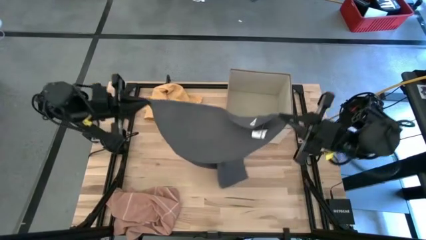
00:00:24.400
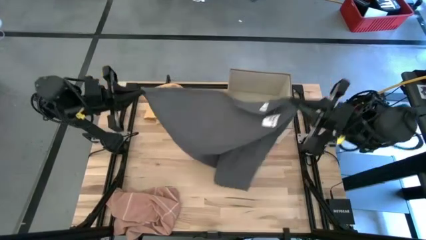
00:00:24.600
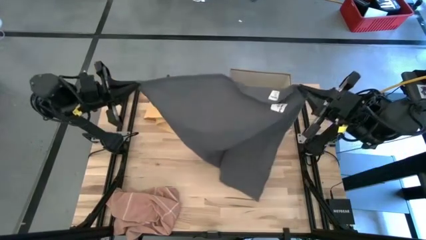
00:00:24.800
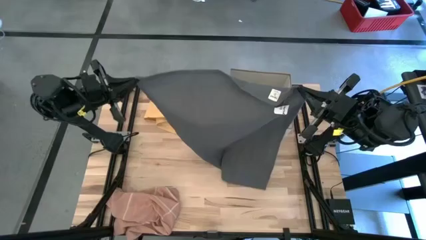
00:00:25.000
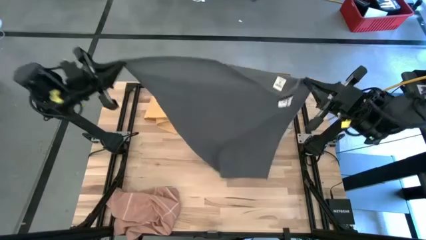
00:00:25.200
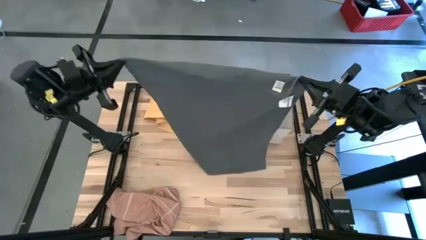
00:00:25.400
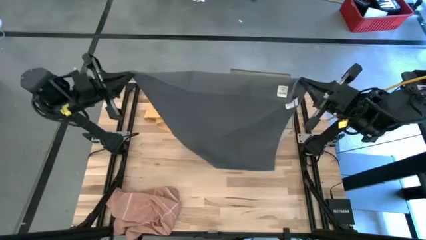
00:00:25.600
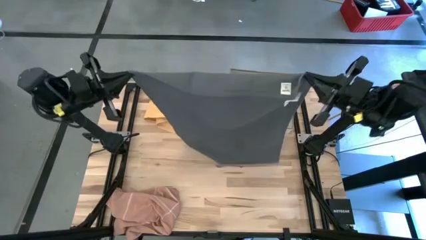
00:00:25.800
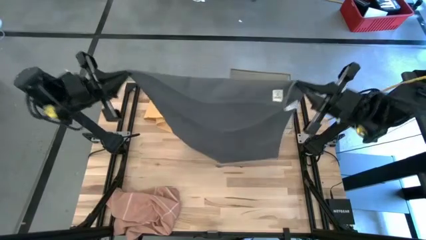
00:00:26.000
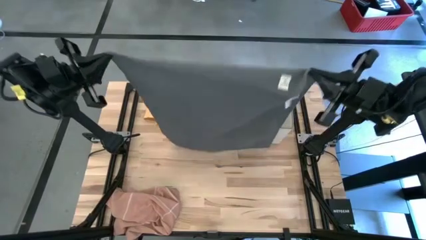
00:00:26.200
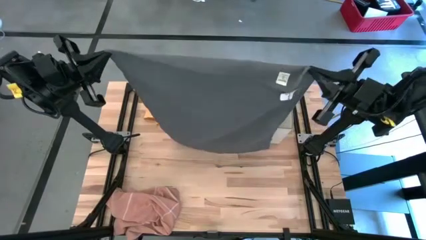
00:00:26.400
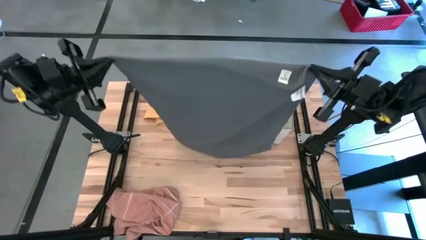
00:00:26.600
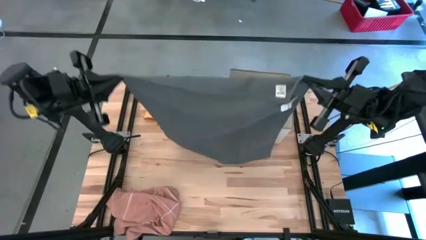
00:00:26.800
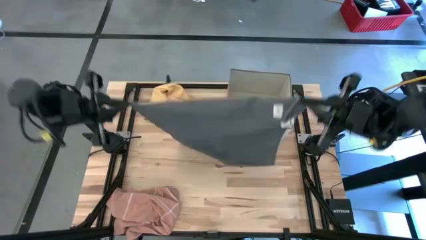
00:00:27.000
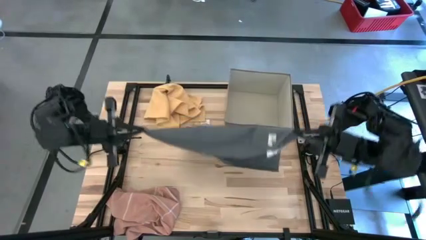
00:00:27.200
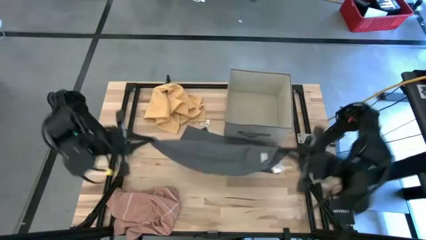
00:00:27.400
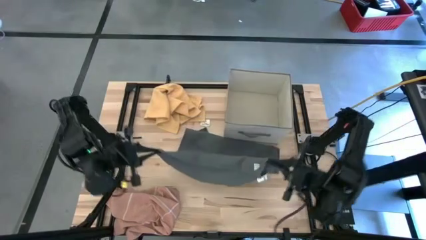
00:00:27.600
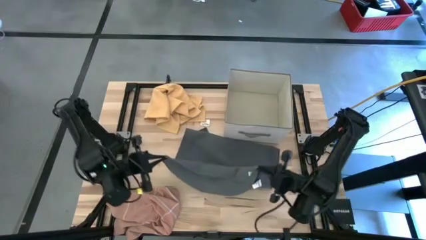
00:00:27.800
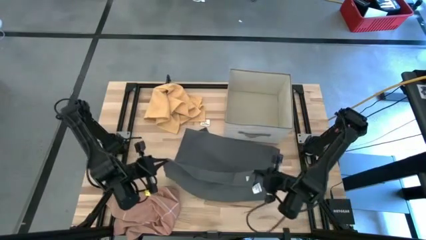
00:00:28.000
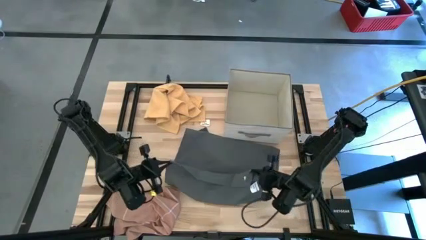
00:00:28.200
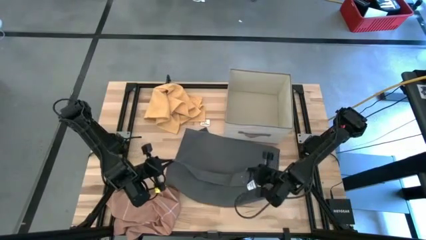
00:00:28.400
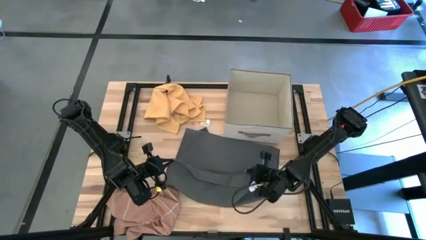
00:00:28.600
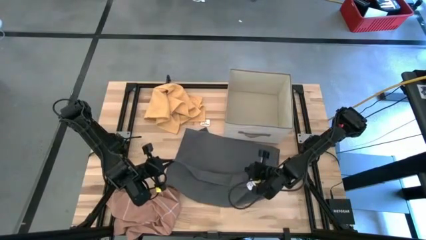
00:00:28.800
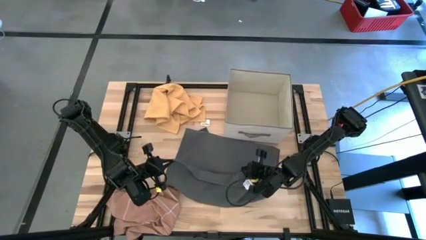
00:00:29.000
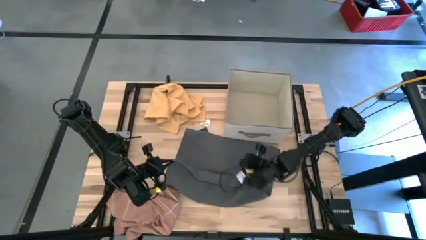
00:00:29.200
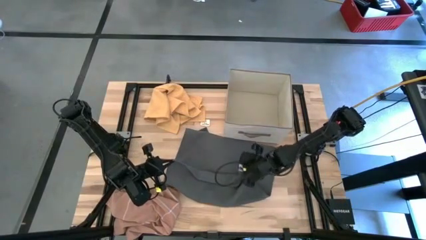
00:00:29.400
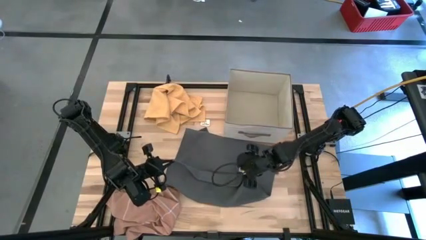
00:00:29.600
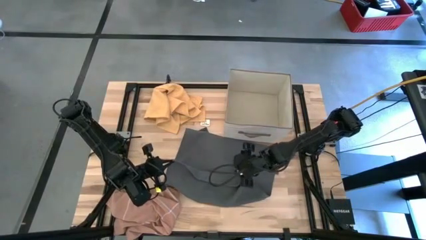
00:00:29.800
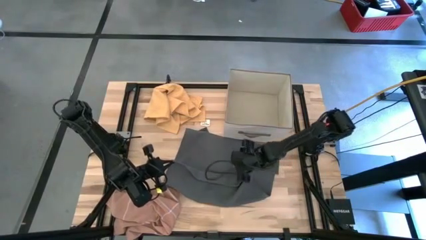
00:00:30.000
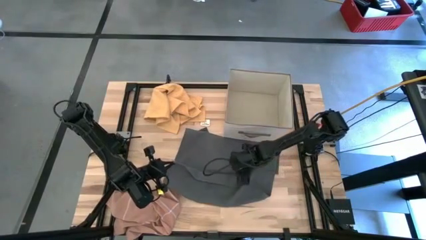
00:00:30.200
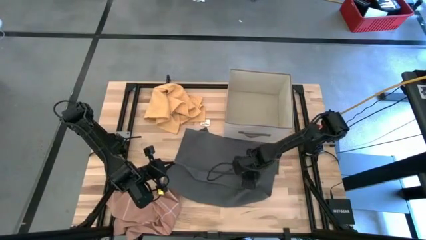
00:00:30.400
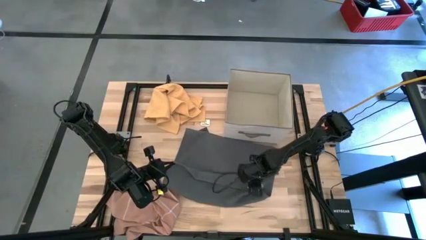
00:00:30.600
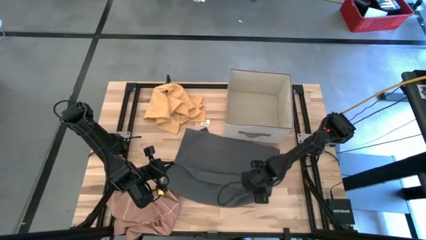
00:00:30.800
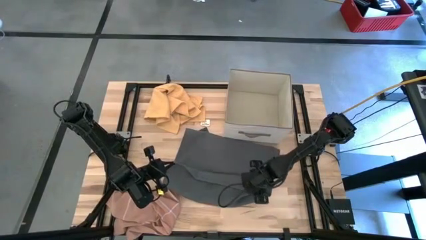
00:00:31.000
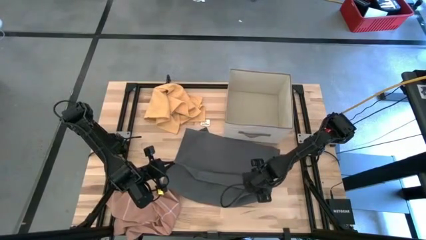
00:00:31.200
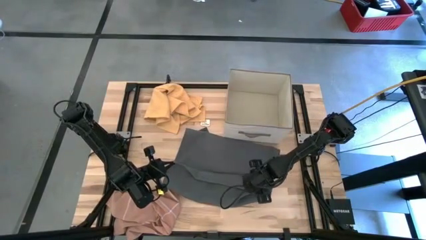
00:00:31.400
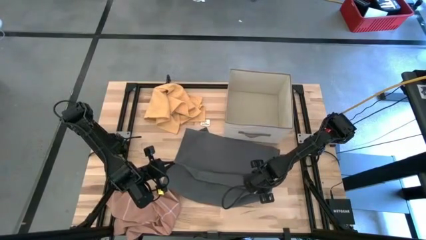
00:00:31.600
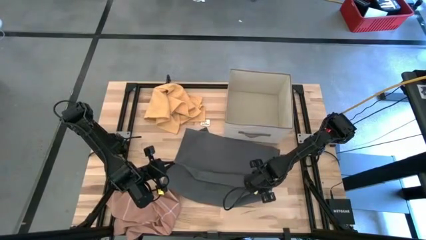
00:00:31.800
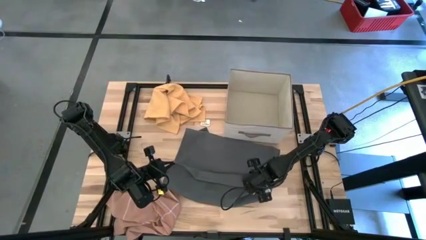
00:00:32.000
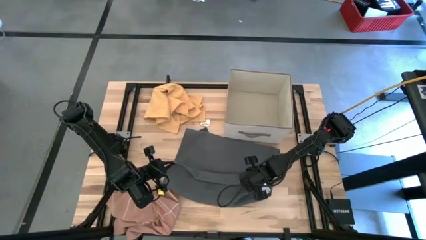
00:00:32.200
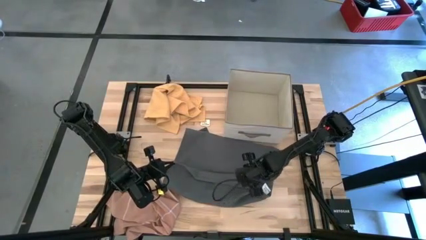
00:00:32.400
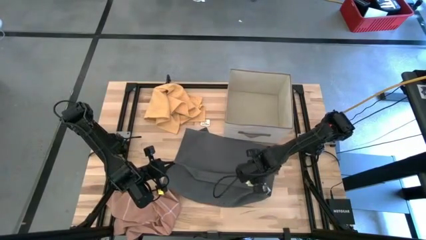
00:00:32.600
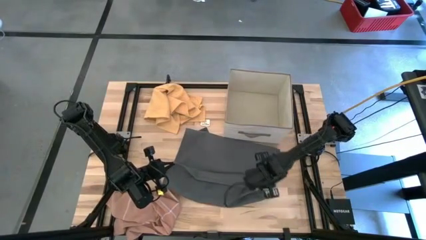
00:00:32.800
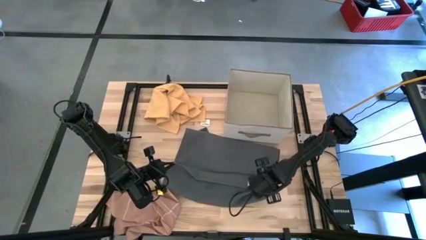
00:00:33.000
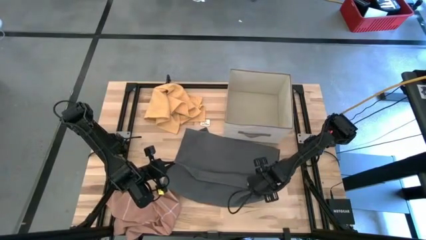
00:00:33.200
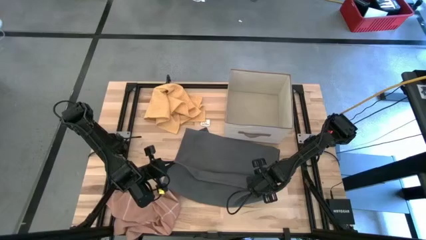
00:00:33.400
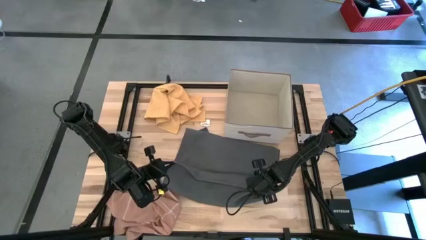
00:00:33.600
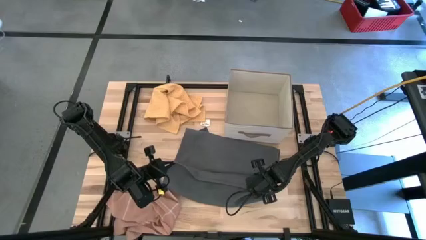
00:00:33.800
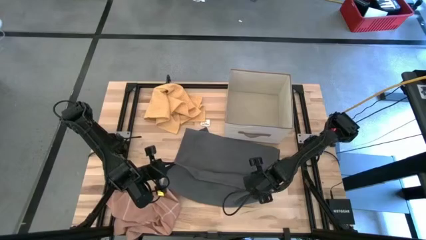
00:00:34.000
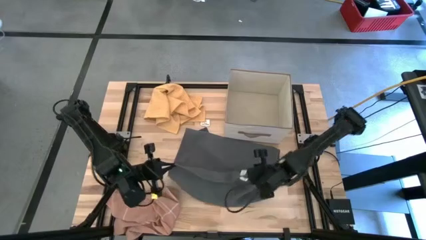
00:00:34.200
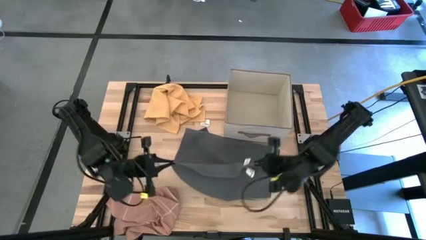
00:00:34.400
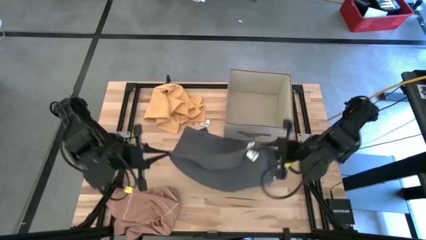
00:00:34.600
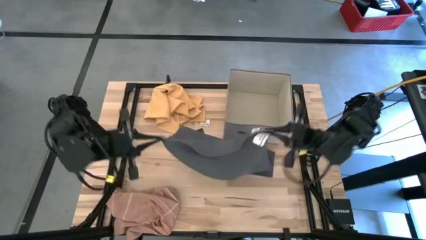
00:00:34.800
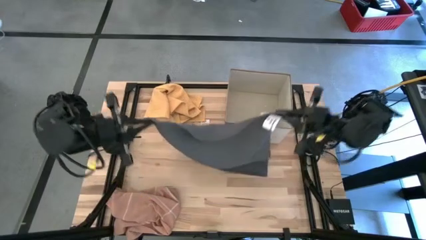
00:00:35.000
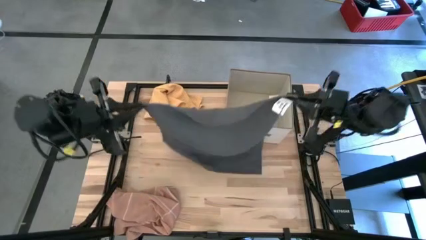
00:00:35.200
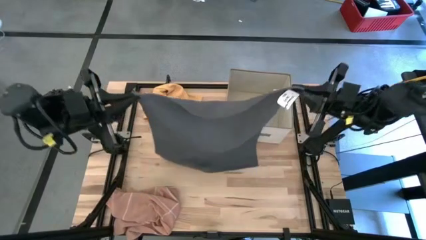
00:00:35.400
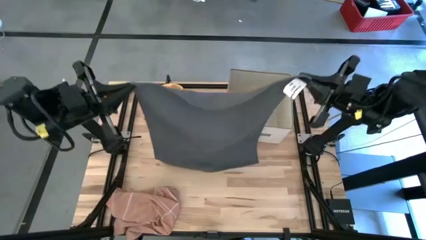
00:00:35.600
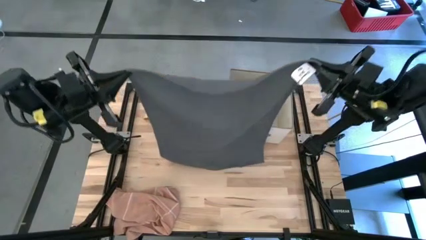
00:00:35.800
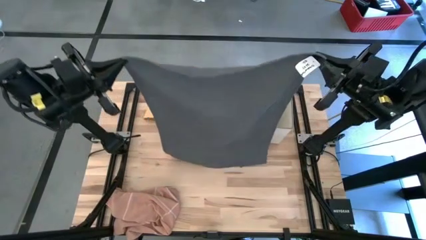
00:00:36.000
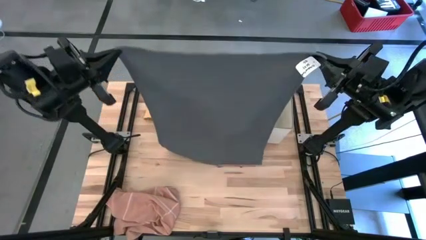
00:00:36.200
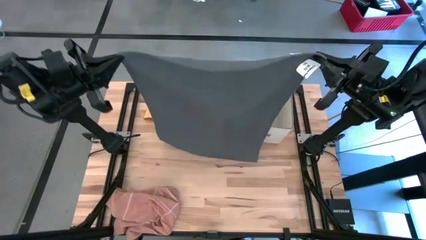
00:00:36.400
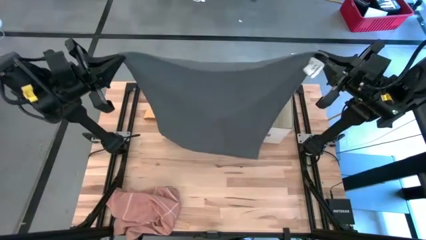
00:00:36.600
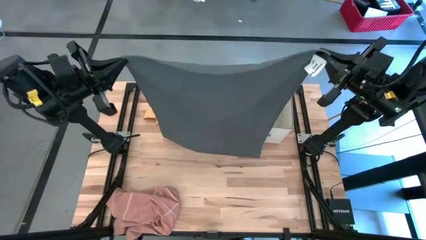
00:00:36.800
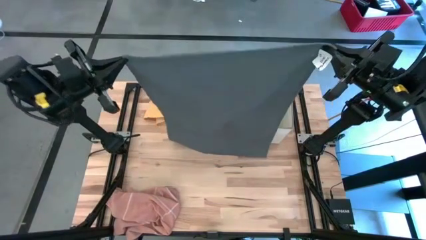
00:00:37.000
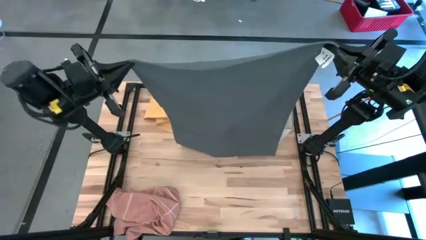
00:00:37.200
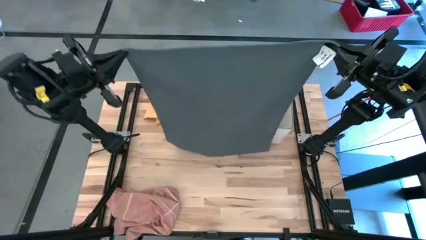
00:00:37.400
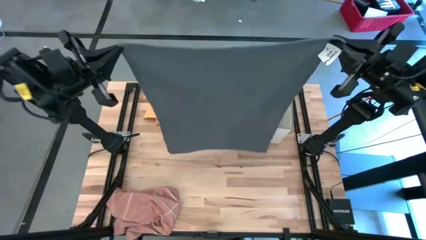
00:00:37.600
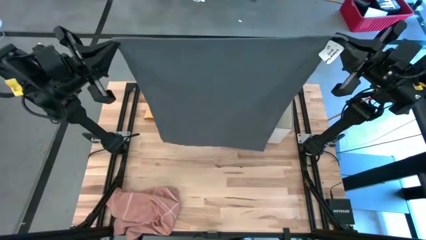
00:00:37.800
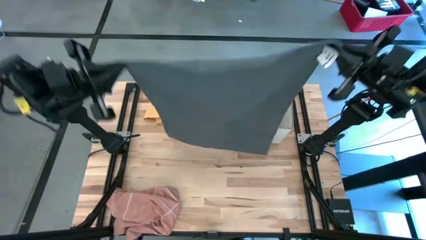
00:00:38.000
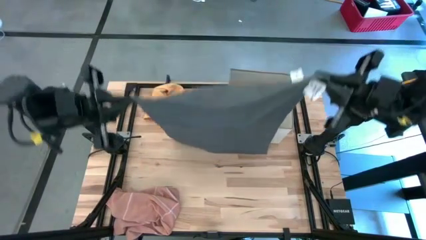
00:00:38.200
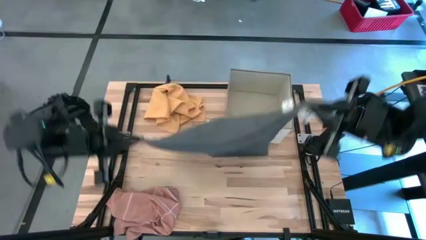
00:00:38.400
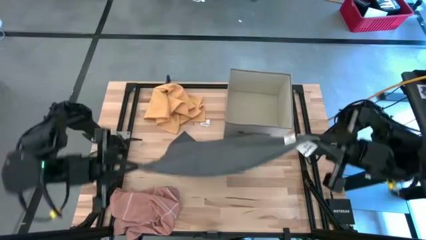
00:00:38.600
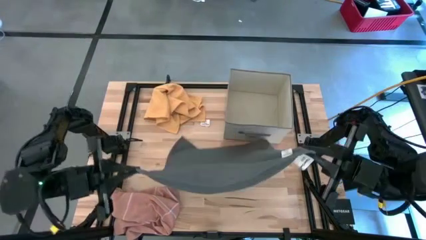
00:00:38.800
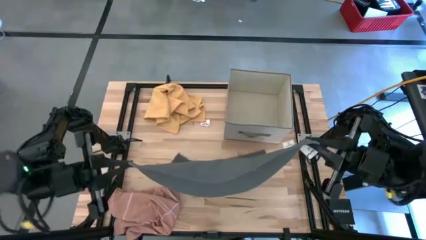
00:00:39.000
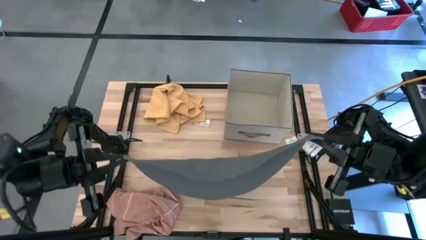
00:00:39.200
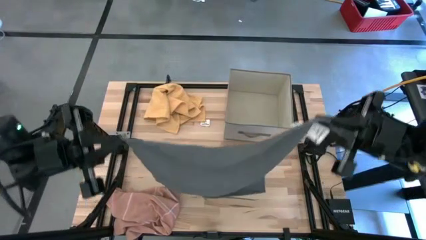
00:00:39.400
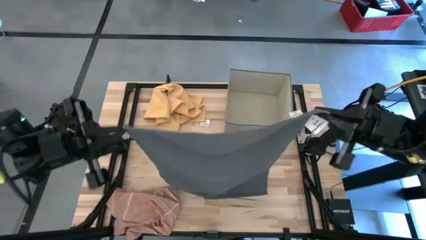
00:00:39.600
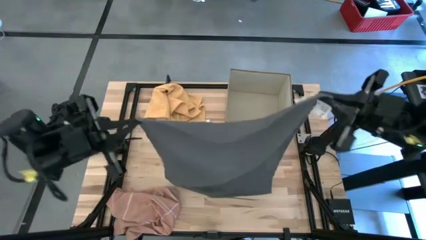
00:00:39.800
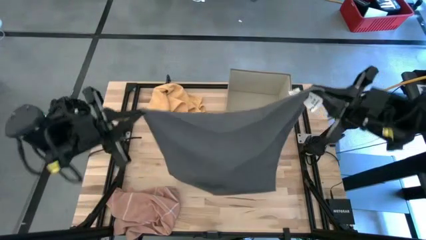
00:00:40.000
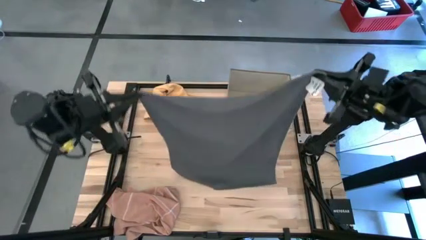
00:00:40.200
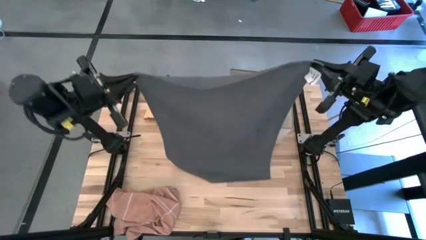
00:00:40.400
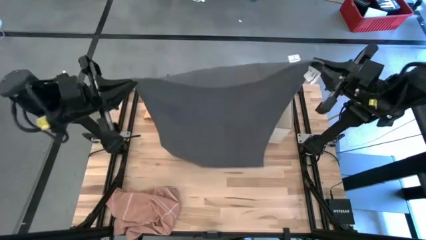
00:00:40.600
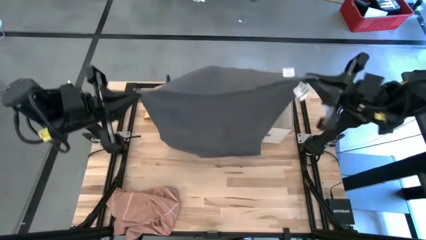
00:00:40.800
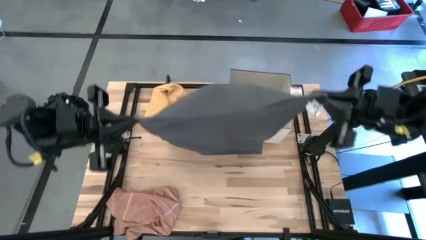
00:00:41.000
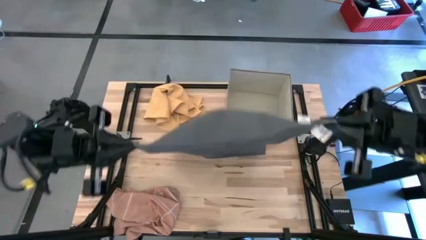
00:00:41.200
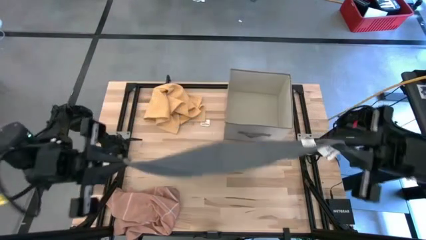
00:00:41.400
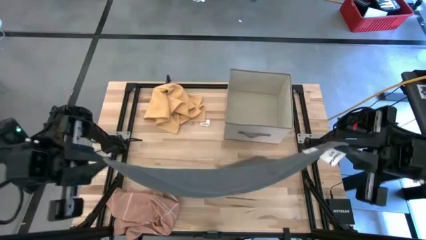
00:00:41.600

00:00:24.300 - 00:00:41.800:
Task: Fold towel
Fold the gray towel
